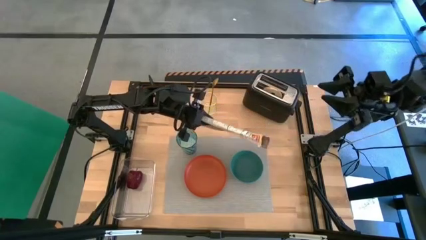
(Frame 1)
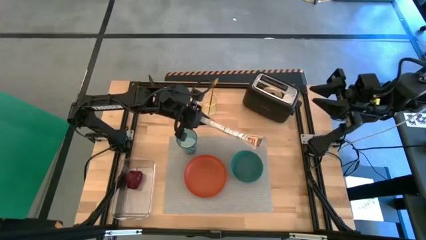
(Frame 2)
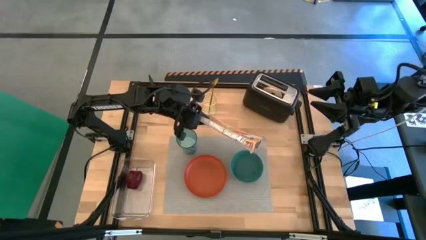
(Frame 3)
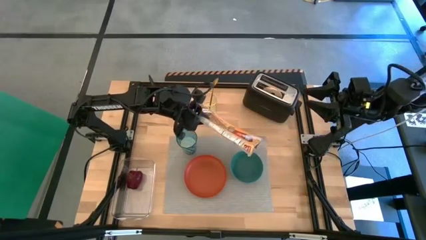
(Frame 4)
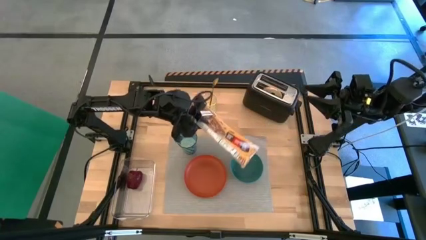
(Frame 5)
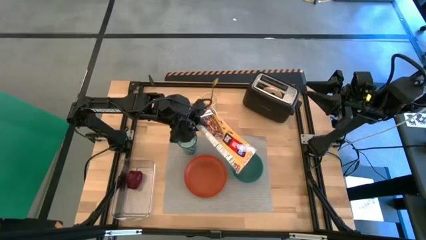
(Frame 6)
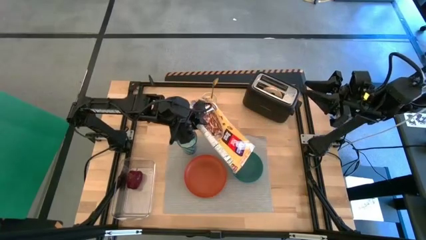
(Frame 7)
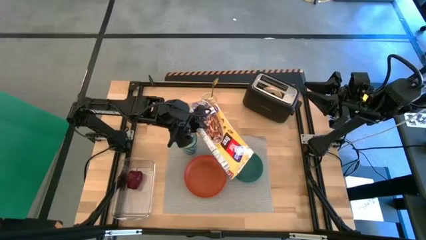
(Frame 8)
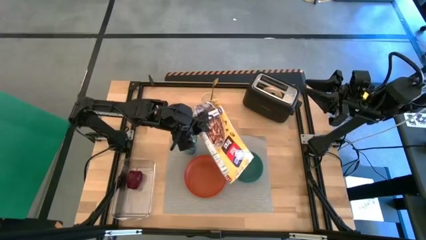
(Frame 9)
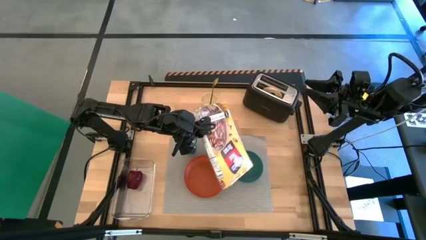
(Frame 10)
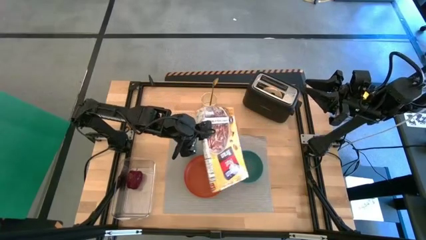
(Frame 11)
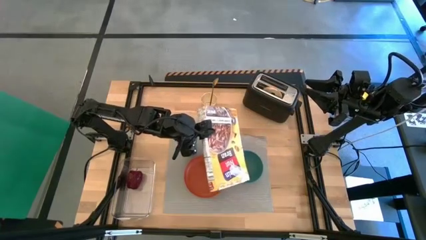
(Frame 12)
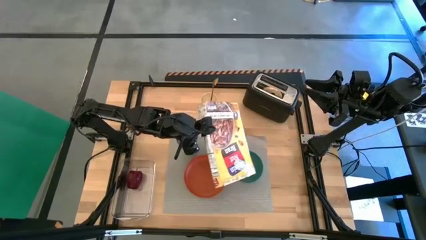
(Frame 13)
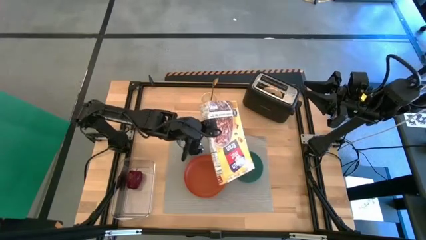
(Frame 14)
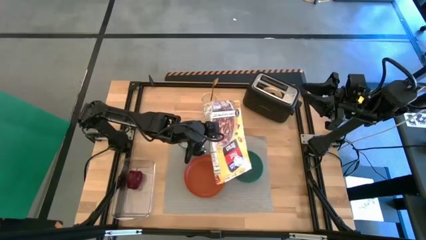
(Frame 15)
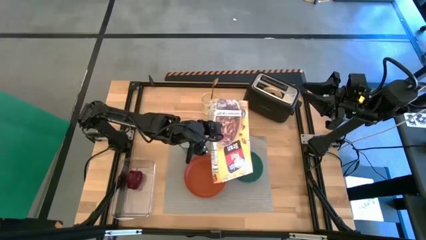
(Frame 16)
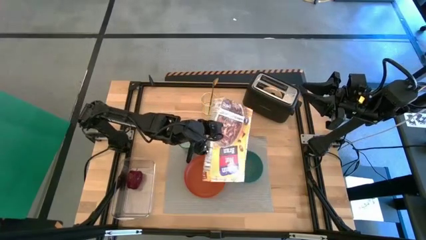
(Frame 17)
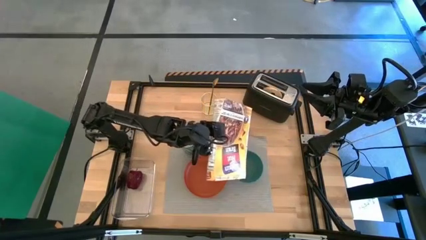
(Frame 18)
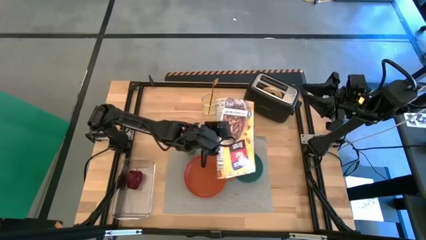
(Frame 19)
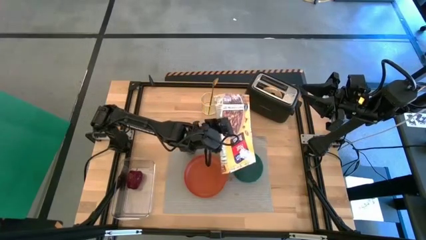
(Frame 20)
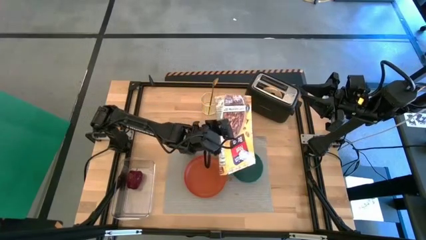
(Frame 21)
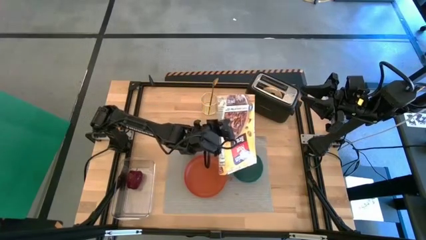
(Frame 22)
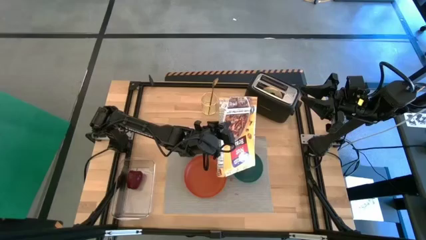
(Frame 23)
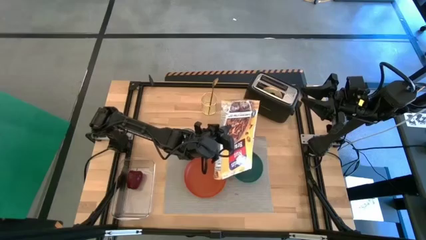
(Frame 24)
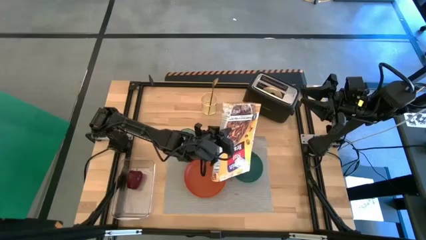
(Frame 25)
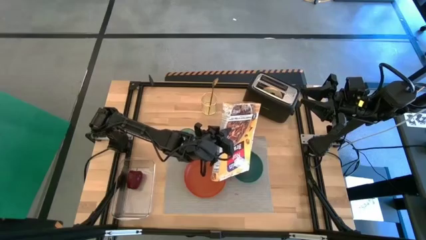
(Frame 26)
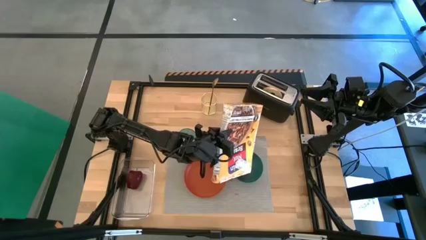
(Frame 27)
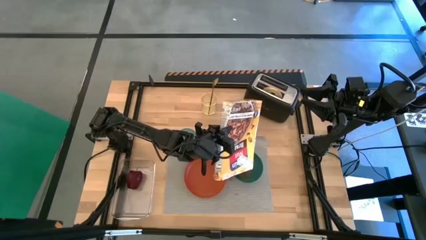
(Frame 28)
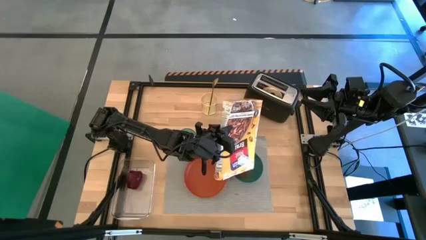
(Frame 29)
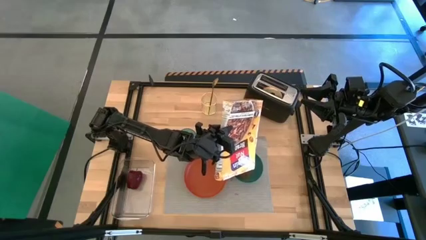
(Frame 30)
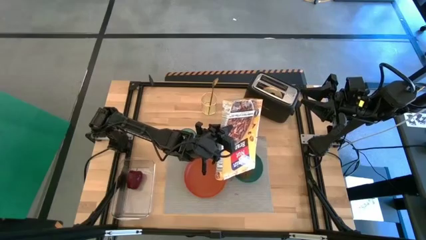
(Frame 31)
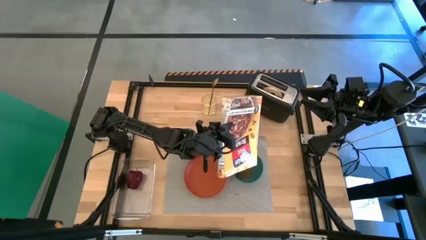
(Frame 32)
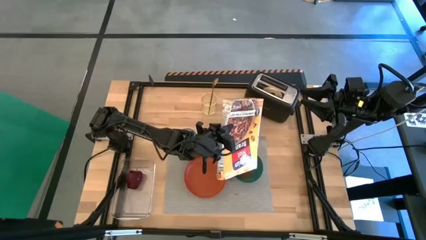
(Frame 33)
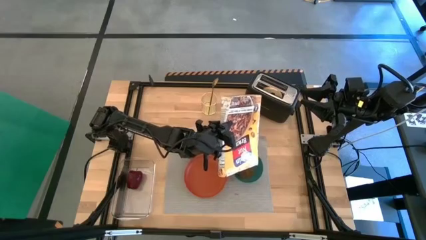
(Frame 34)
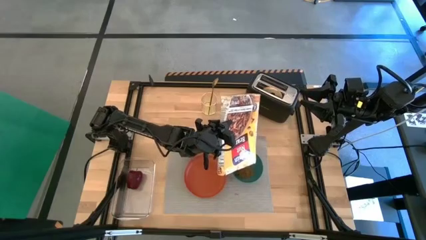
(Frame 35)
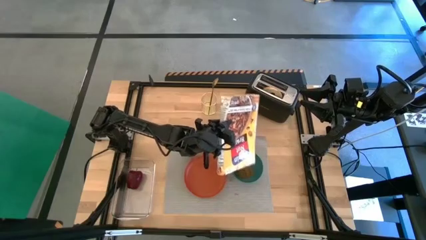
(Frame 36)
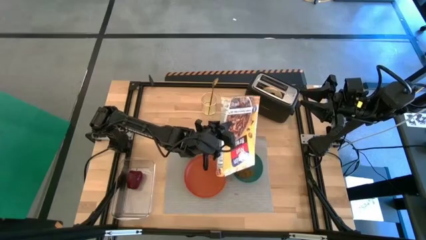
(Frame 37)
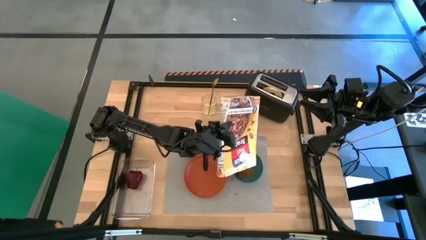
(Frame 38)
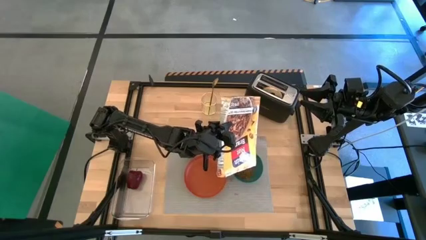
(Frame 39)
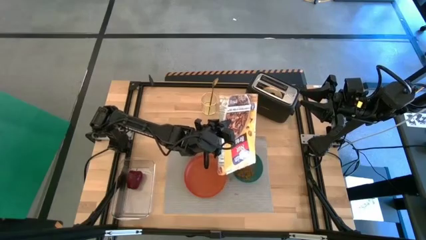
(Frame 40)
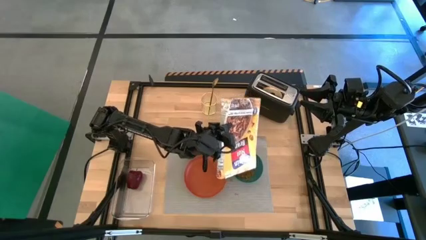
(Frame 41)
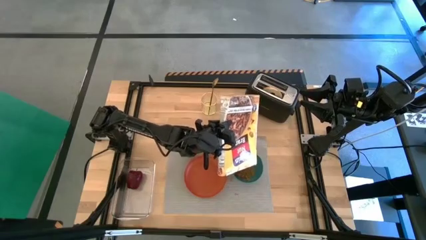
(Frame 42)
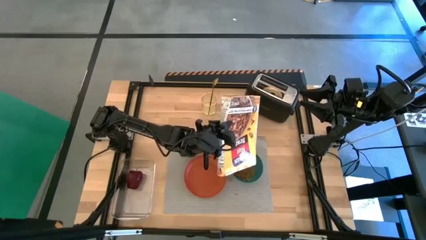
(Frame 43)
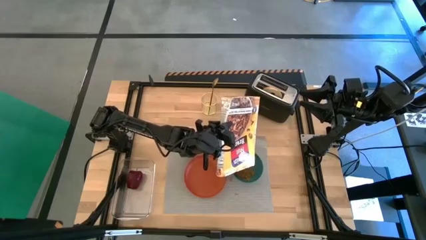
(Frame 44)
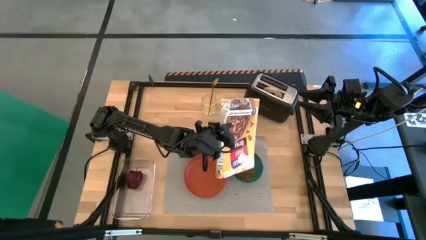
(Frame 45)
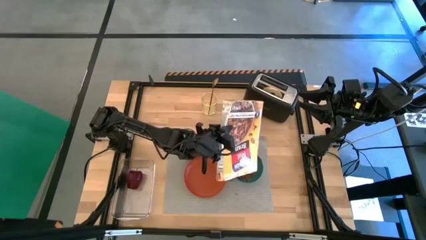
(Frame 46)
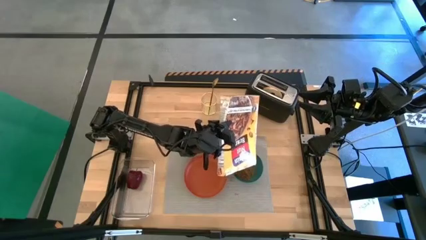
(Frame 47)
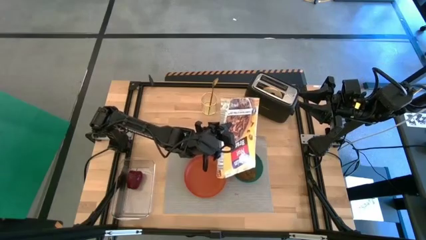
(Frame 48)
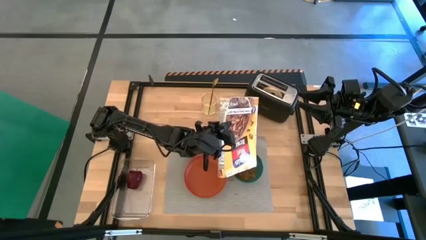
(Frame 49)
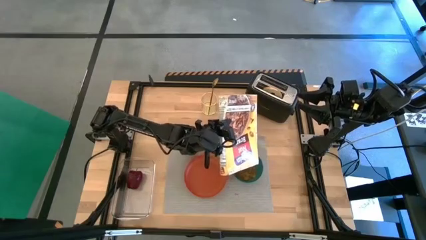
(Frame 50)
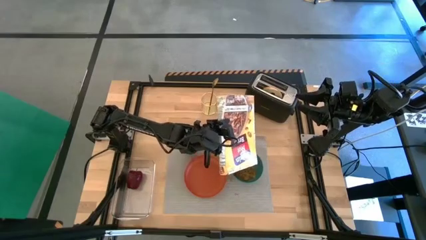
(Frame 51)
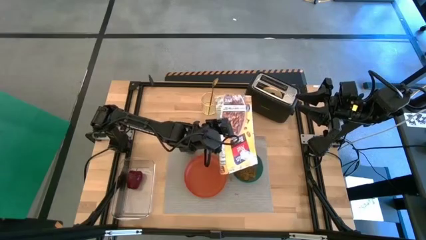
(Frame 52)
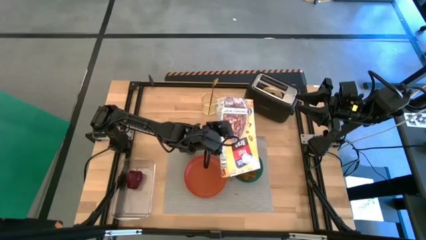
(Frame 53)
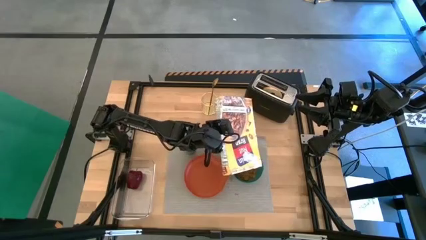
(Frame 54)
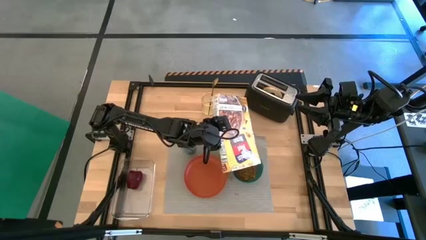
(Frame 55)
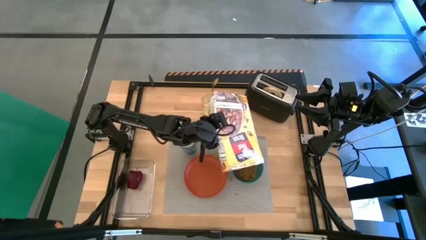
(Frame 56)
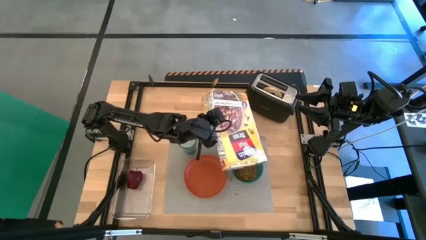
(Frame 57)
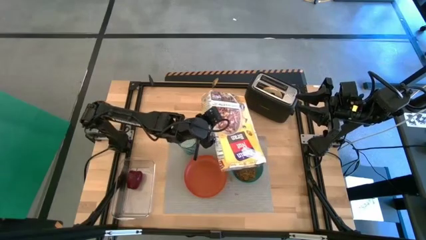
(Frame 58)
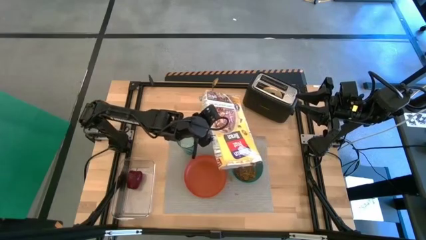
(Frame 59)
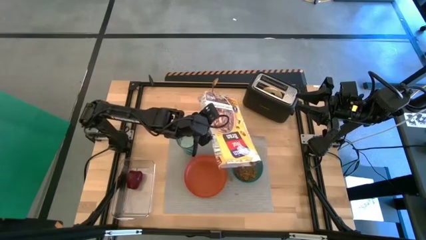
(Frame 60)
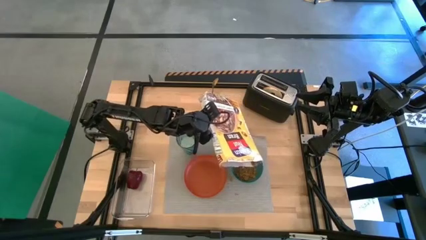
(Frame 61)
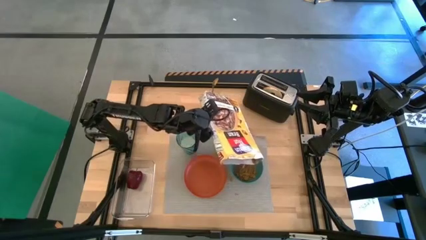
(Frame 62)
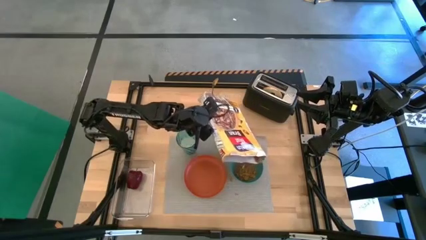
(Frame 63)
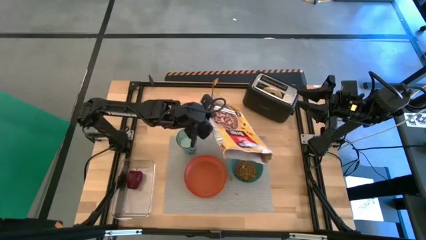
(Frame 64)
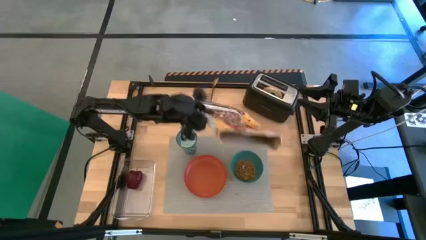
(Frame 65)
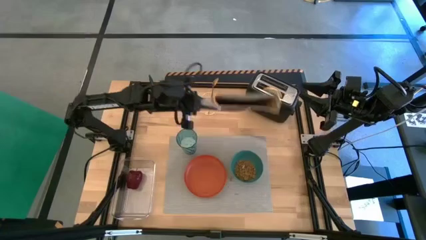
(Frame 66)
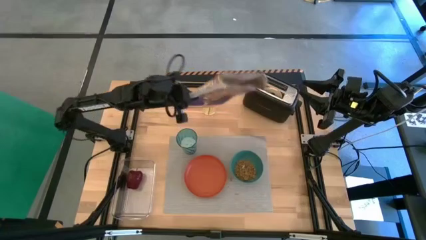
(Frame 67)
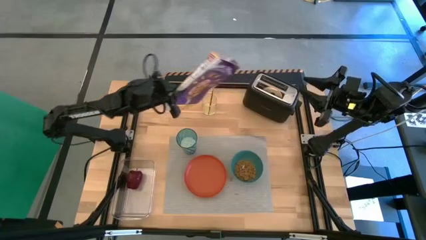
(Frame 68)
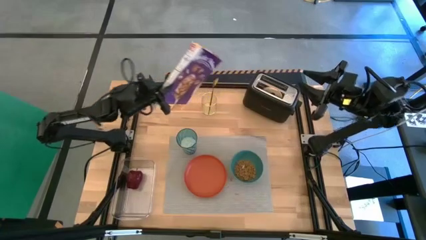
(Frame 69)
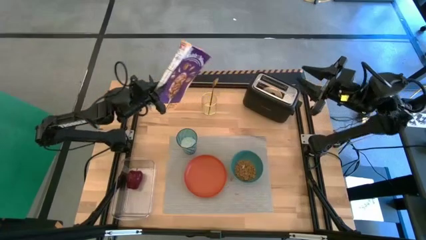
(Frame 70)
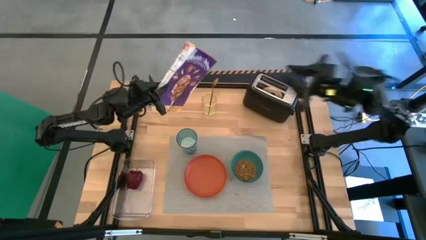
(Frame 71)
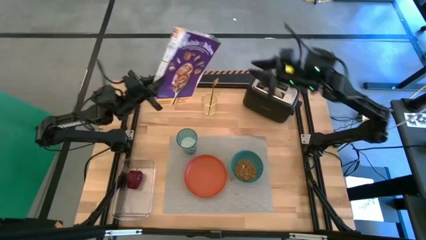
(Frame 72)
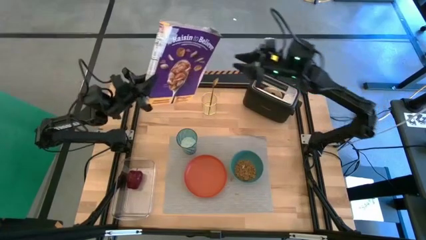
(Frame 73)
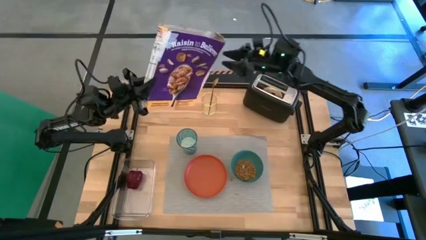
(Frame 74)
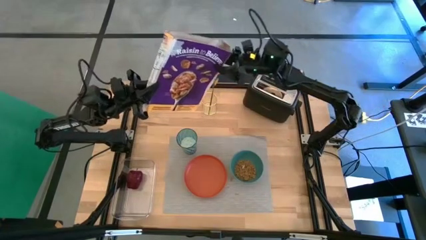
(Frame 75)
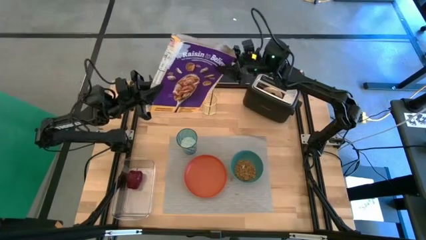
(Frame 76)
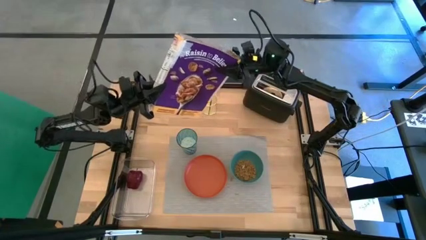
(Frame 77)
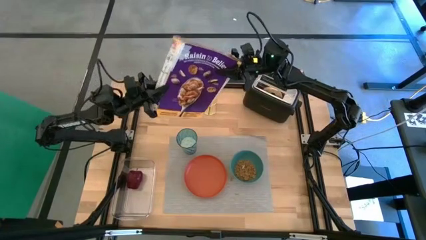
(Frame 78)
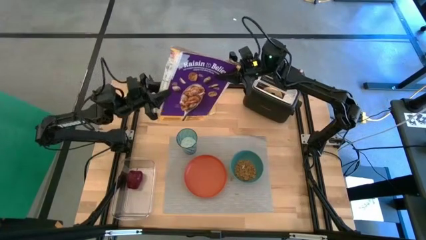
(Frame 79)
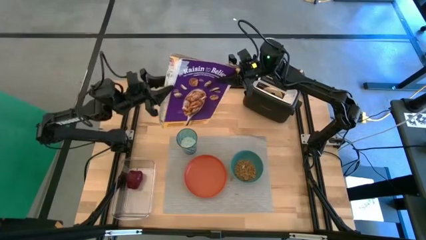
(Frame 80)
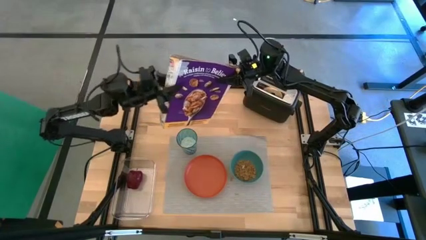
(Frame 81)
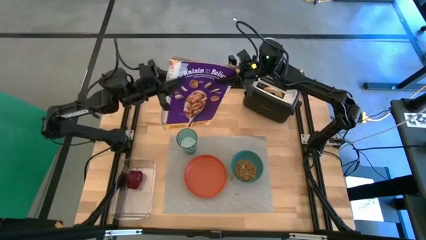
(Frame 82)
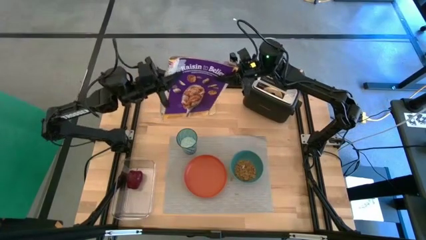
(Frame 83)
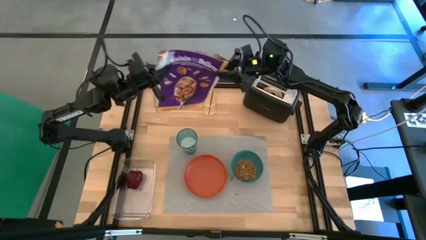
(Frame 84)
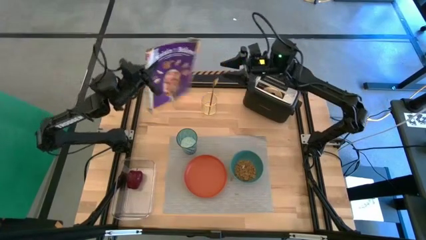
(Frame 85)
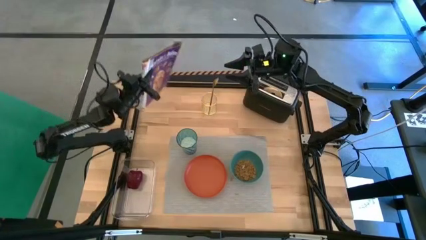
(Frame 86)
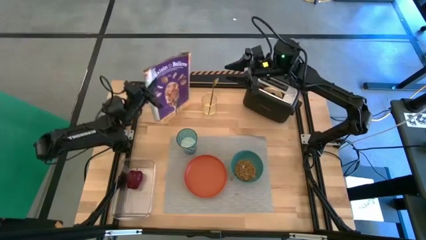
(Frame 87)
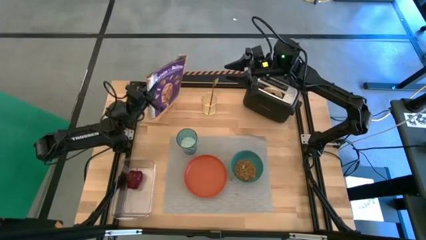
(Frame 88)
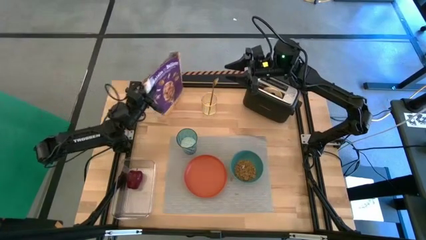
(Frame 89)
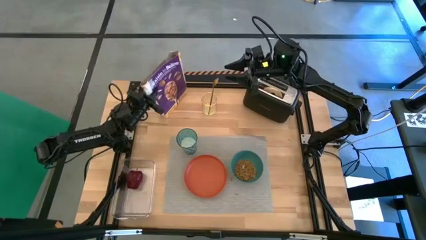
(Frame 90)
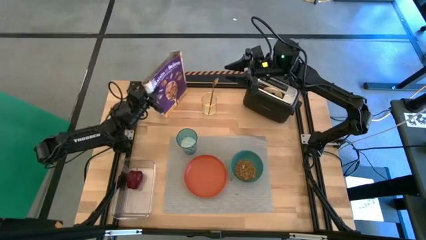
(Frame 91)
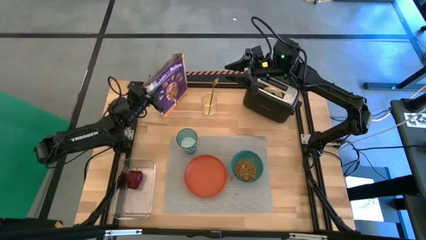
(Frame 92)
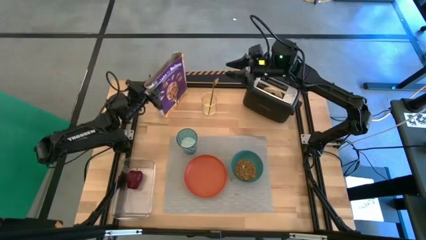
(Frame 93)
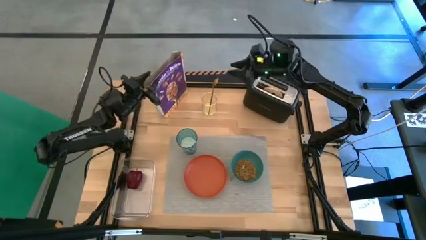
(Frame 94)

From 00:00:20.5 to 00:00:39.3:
Task: Arrange a breakfast setting
Pour the cereal from the cereal box into the blue bowl
